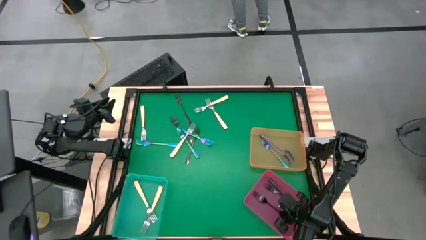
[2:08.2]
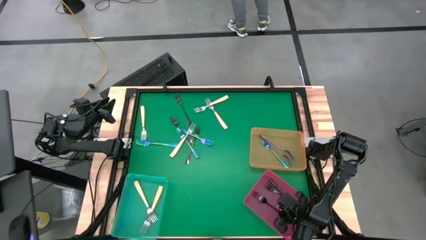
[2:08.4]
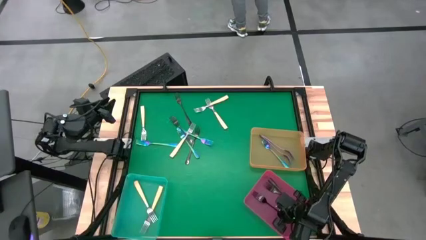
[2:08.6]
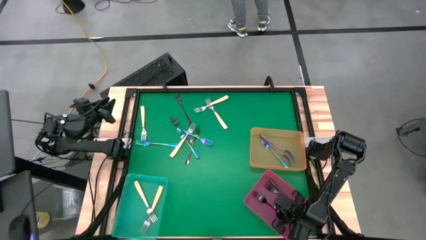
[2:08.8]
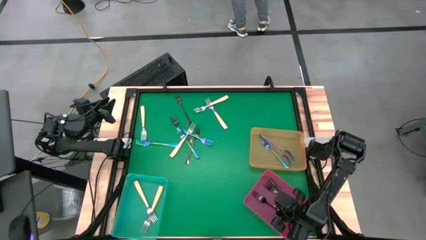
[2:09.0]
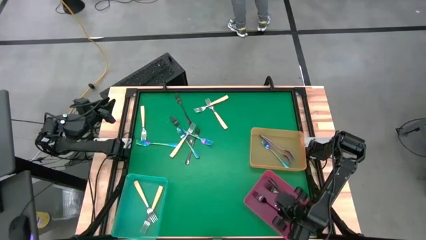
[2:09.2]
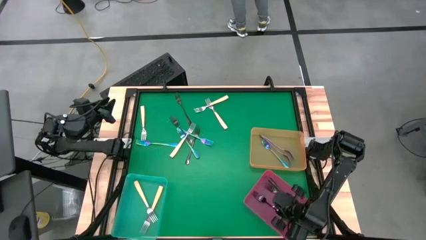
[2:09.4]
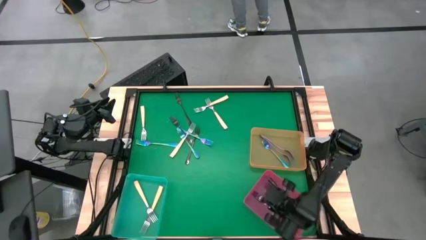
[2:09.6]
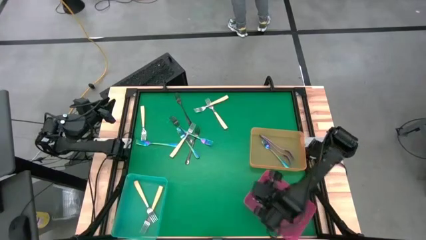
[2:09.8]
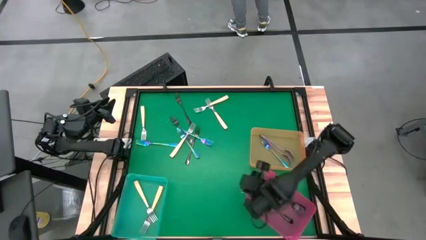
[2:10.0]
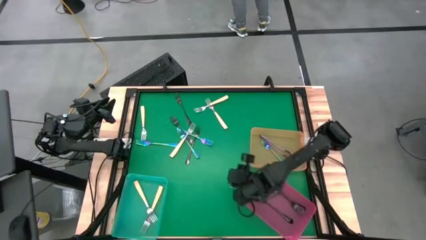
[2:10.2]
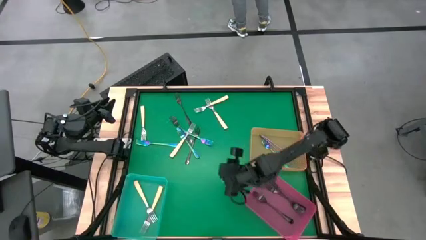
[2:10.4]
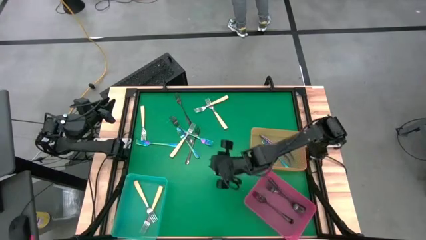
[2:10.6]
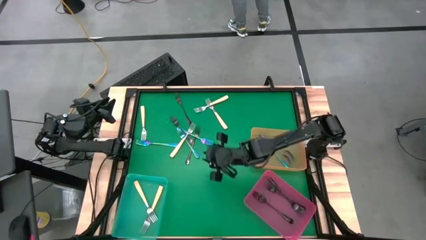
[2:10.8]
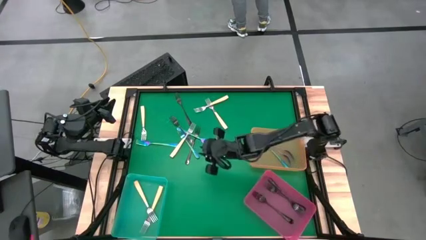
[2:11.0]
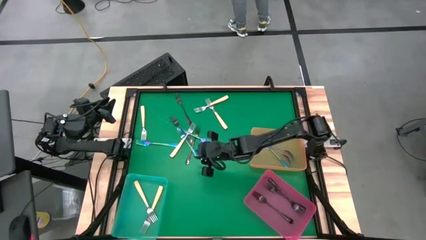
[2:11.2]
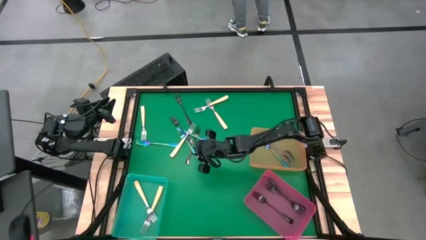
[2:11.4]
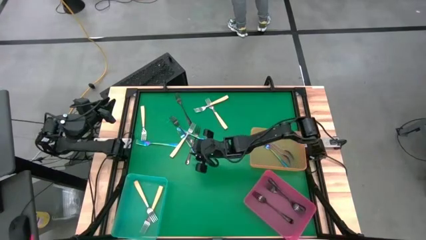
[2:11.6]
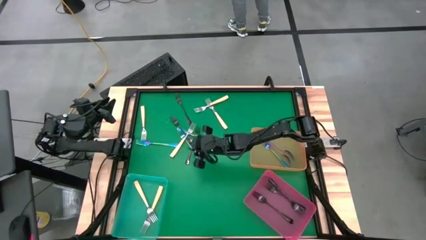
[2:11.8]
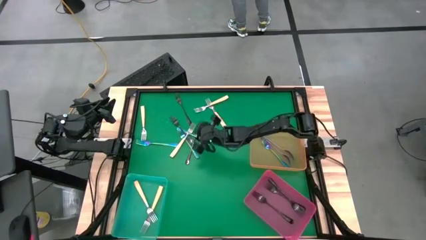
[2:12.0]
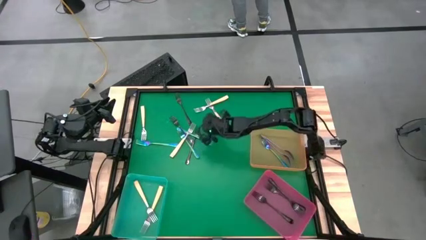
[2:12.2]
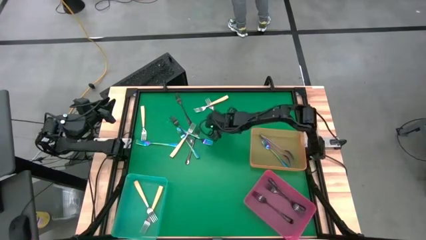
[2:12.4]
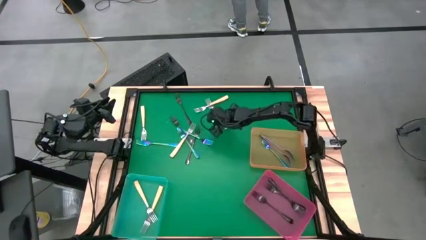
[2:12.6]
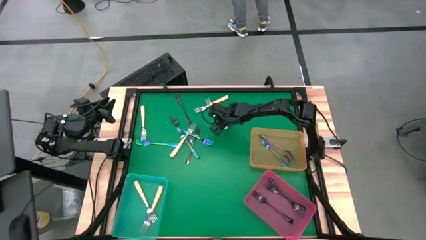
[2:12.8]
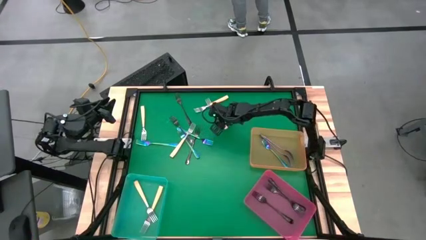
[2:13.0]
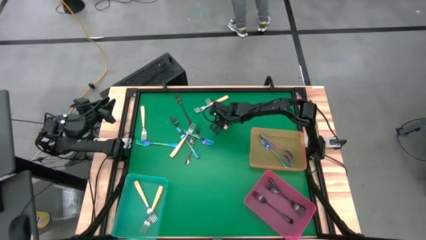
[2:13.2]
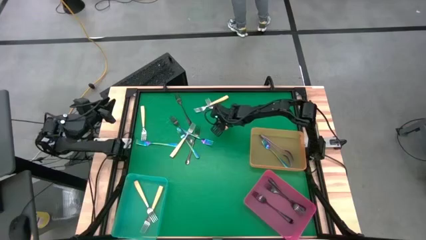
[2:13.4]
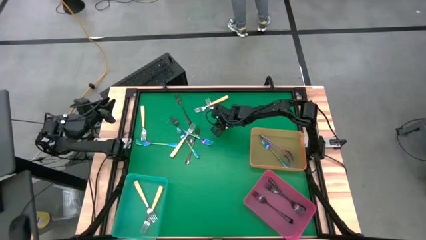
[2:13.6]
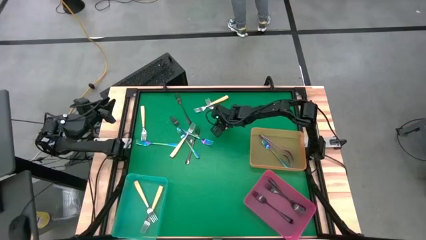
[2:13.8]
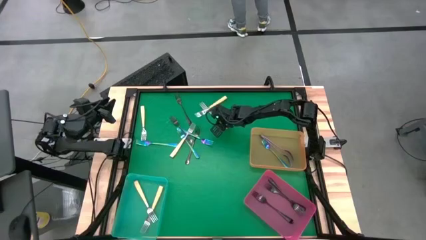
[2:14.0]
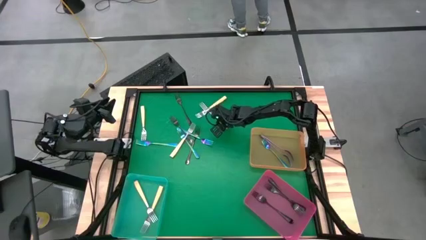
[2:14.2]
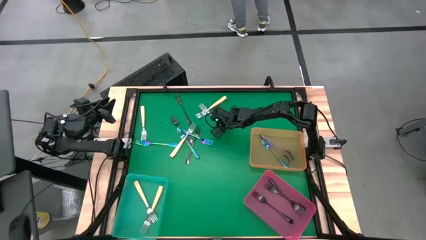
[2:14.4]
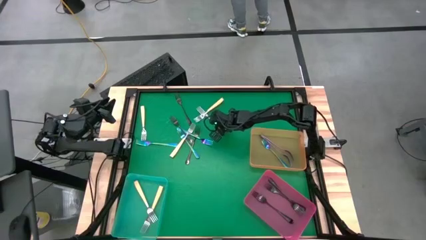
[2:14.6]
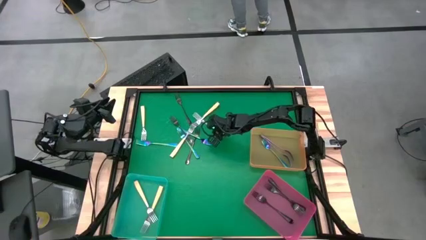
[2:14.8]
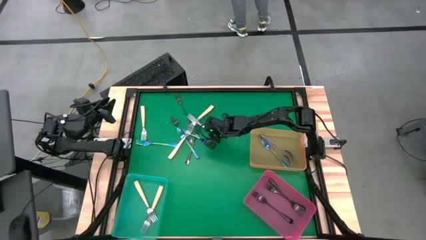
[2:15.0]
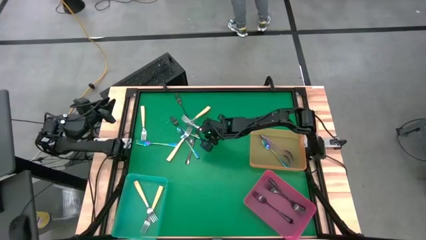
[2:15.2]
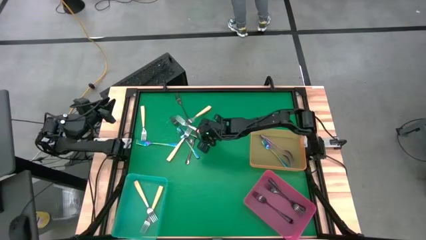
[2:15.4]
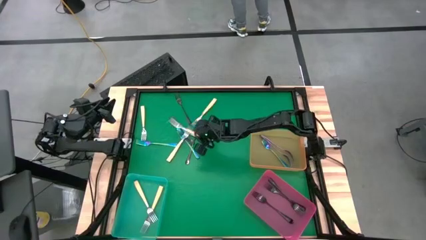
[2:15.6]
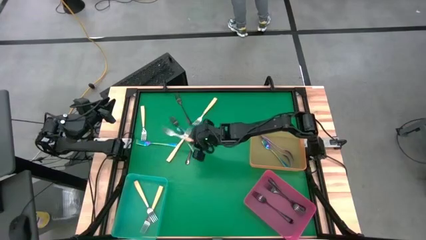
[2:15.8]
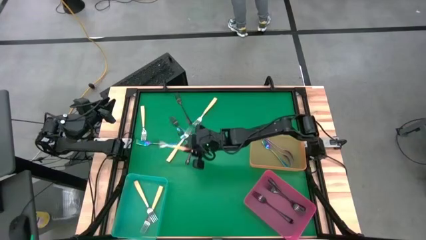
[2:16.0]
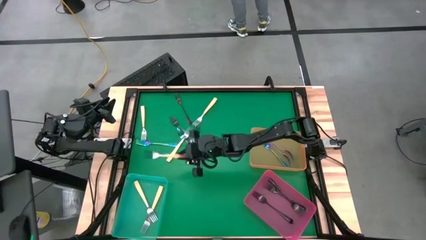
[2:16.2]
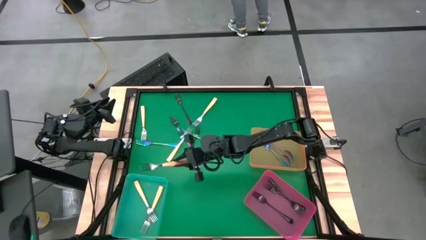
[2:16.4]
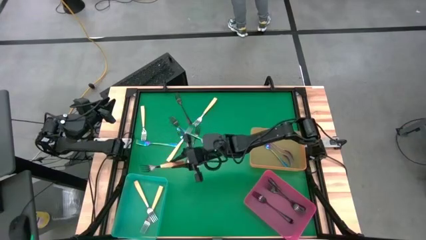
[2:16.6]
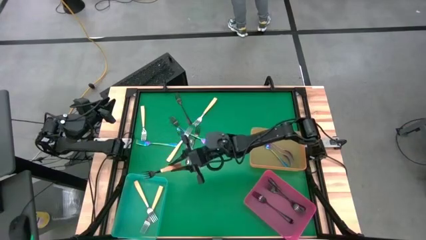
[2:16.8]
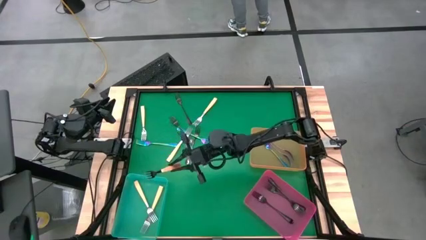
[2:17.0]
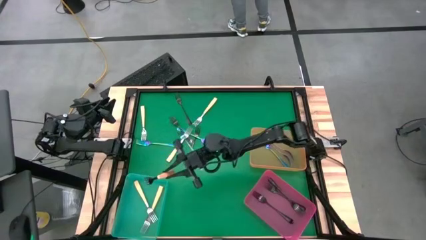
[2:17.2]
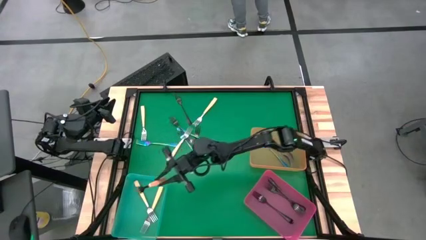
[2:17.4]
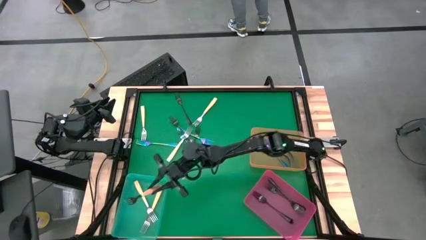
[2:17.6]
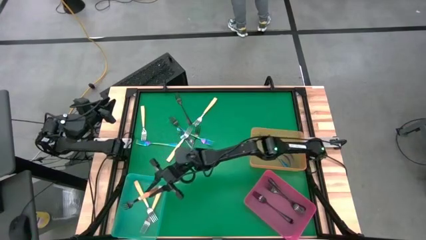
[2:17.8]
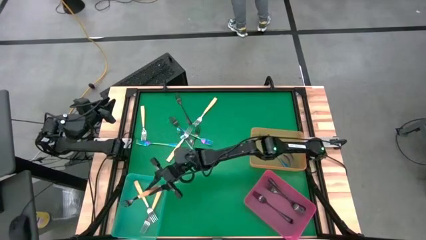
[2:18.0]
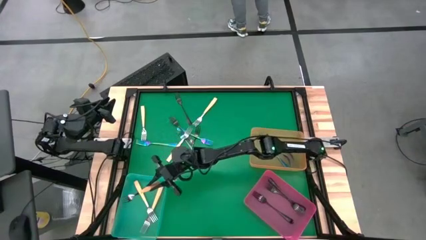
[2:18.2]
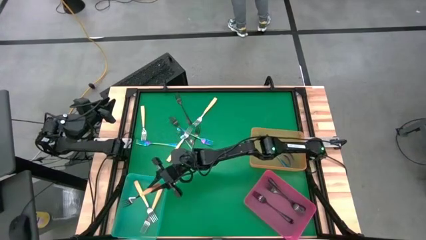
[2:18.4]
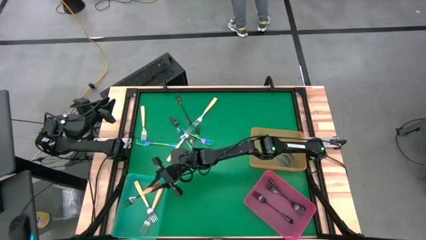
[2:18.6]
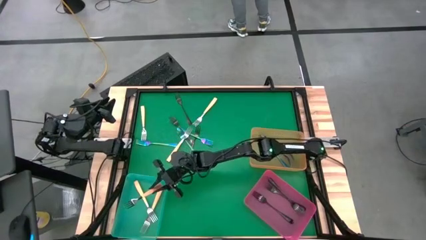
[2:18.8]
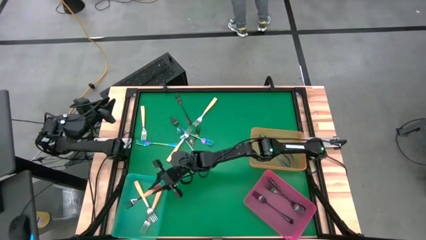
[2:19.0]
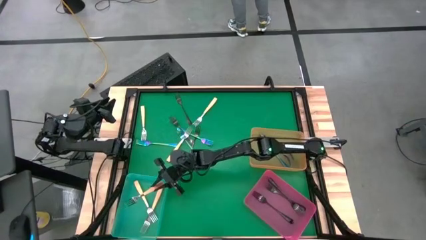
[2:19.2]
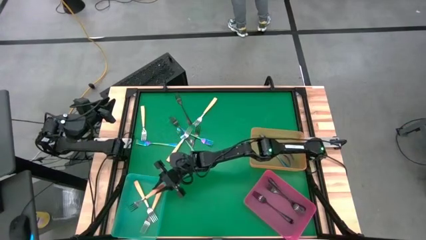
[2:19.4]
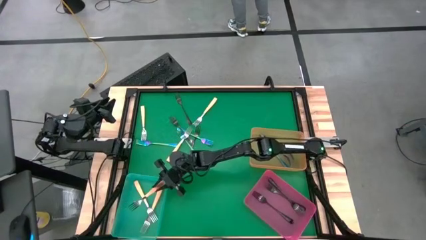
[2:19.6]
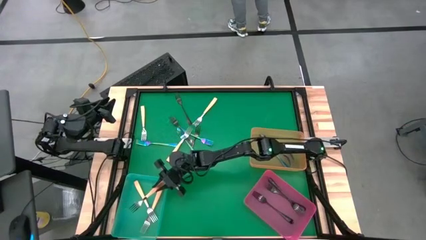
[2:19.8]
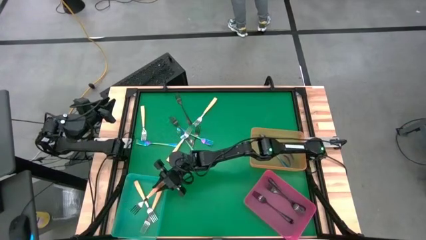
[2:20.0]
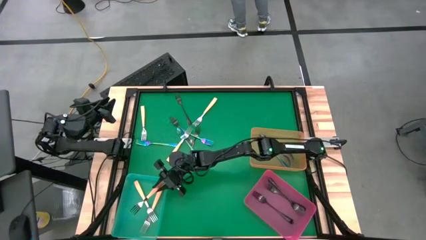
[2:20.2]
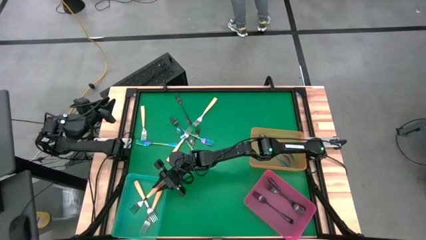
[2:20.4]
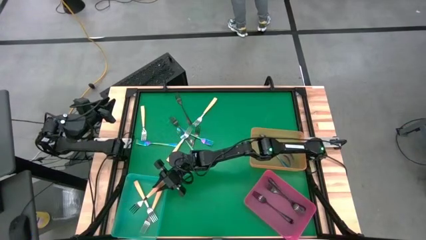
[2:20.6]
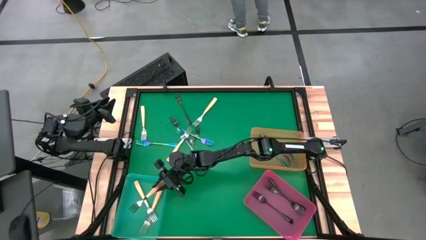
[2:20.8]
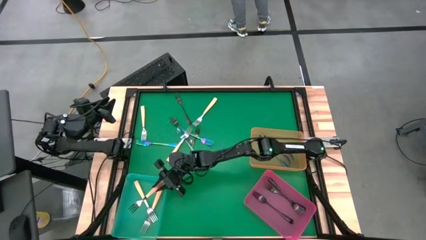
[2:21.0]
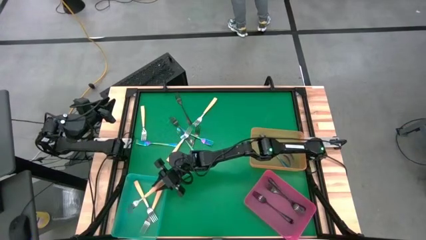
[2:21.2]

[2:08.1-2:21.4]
Task: Sort silverware by color (type)
Put the yellow fork into the blue bin

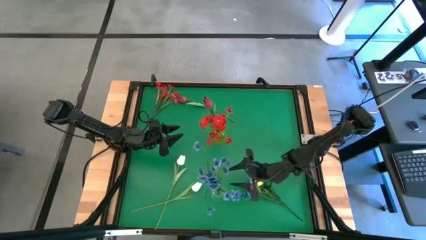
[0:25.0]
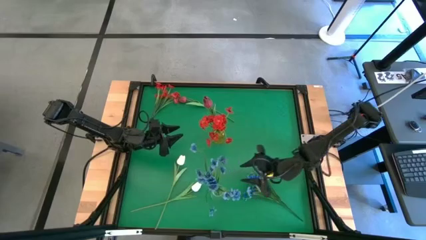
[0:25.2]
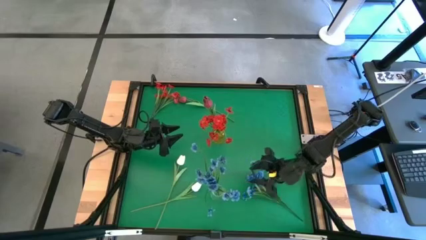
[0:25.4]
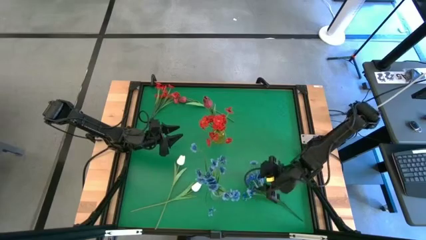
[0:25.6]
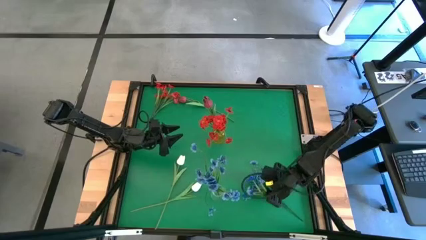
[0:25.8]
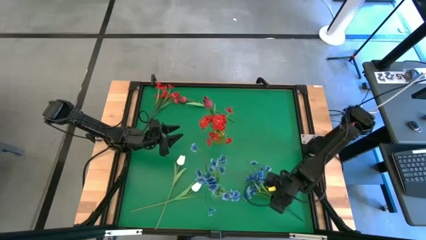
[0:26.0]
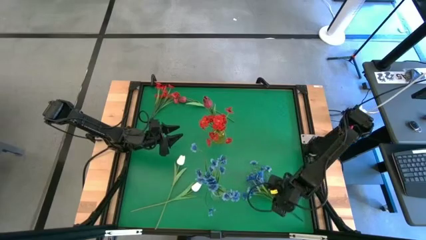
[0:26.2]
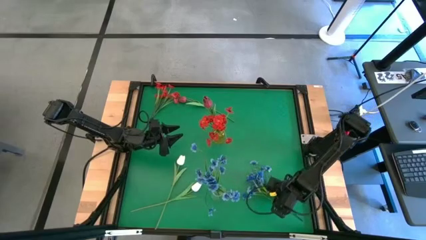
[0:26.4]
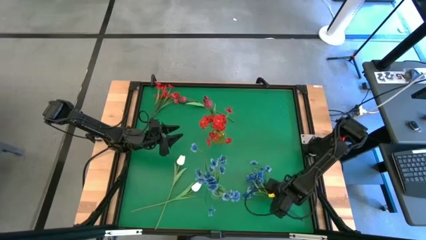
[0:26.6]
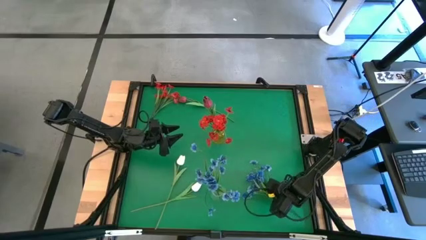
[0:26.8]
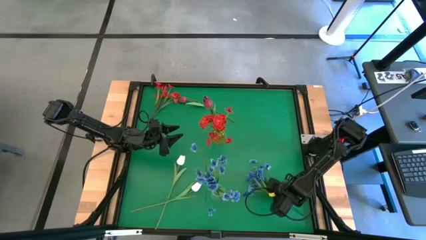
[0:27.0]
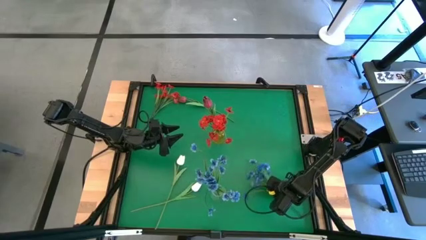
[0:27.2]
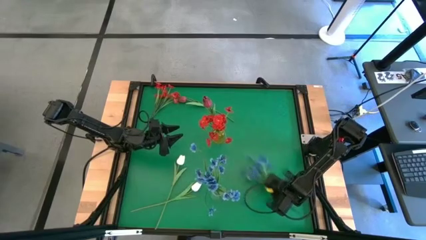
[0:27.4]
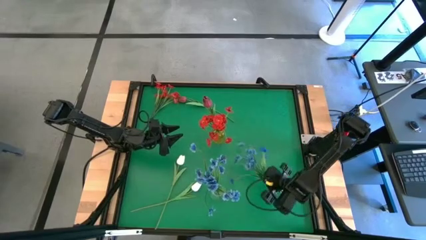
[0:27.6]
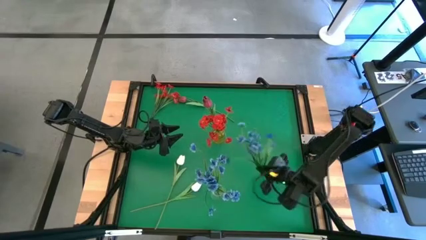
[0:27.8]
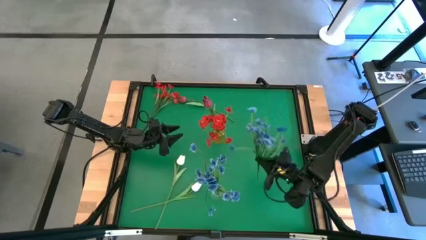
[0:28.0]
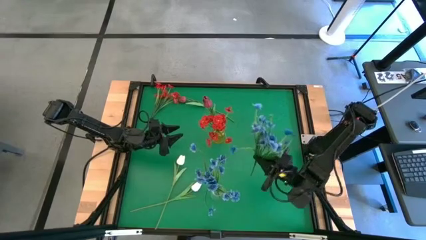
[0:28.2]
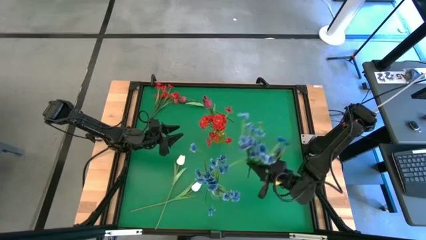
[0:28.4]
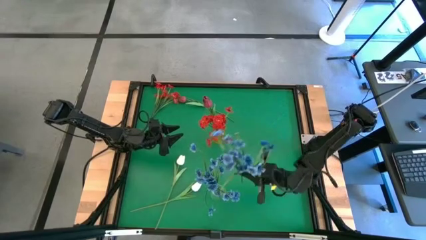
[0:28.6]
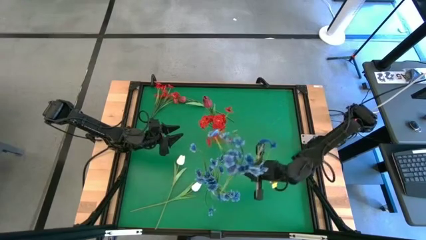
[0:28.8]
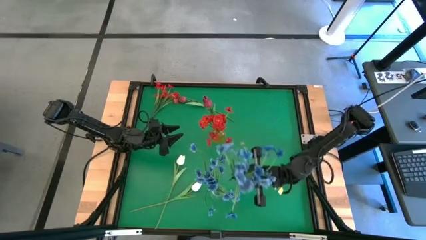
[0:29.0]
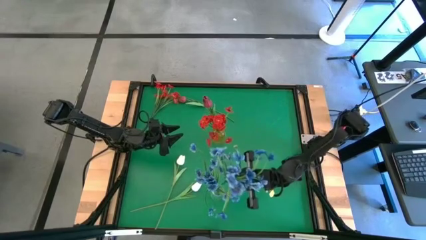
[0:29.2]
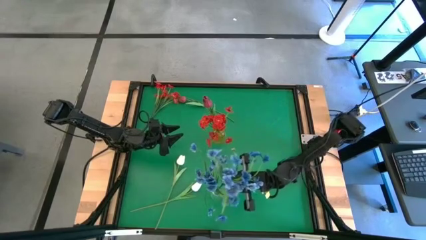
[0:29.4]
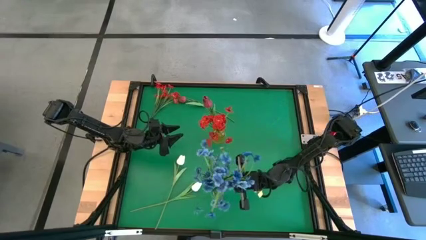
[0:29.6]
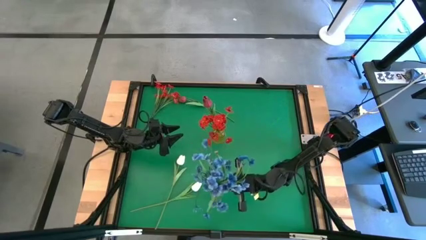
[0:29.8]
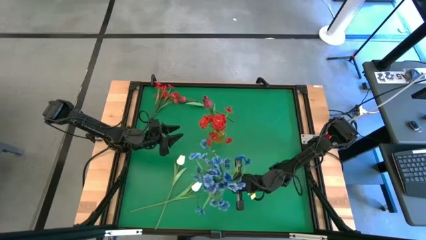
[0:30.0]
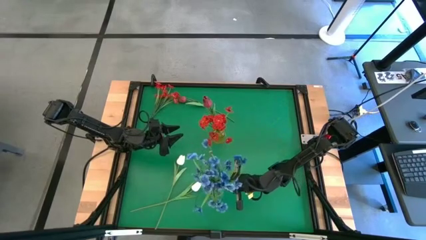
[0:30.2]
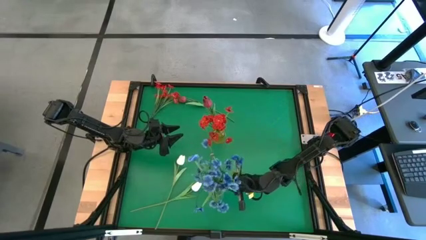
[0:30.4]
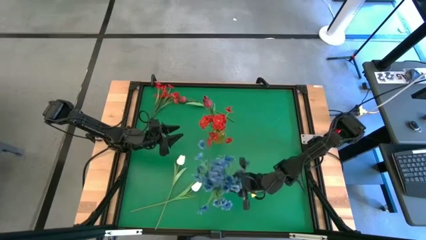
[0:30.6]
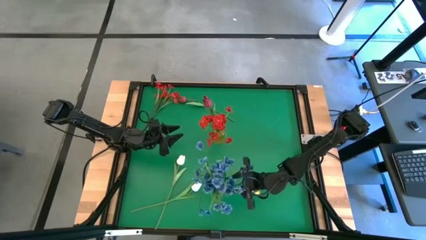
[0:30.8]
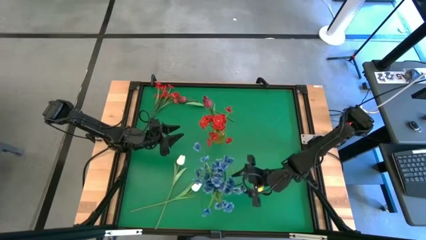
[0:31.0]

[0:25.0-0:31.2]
Task: Sort flowers into vase by color
Put the blue flowers into the transparent vase
